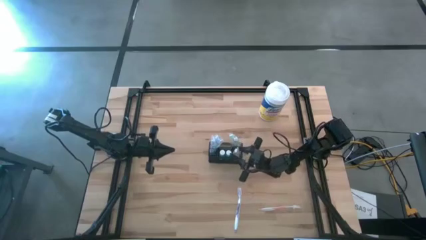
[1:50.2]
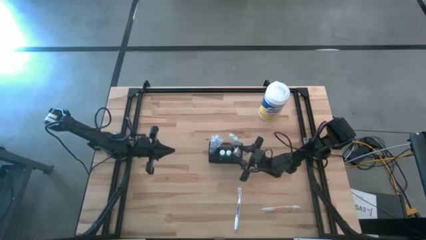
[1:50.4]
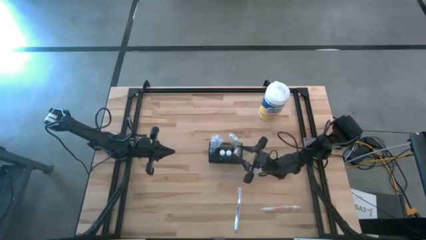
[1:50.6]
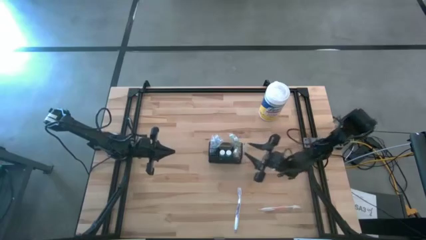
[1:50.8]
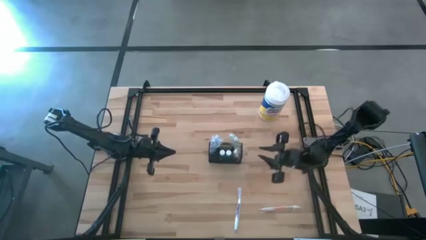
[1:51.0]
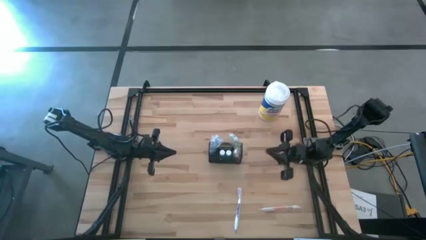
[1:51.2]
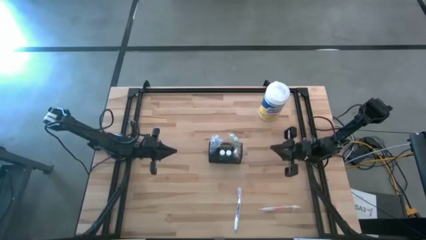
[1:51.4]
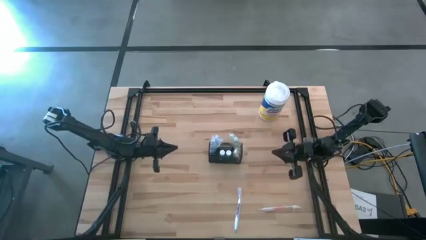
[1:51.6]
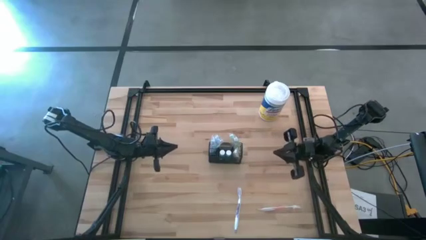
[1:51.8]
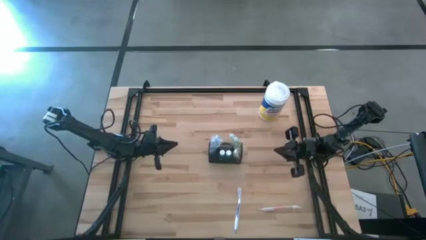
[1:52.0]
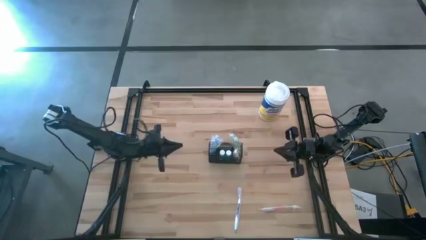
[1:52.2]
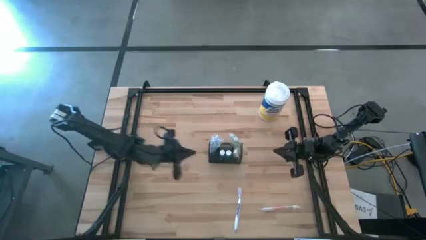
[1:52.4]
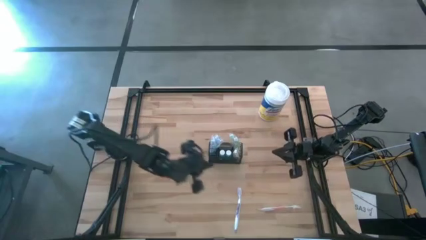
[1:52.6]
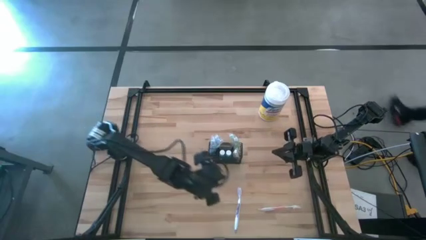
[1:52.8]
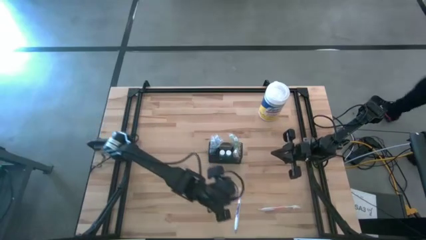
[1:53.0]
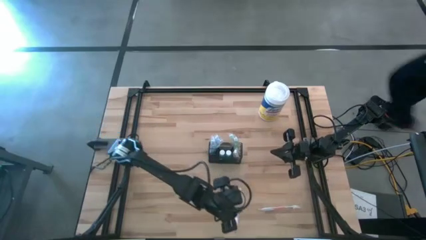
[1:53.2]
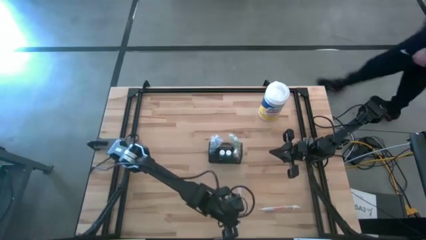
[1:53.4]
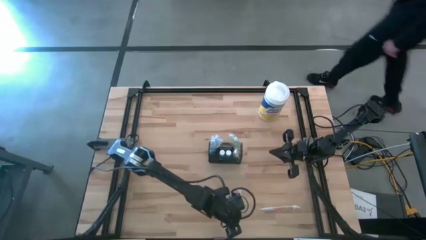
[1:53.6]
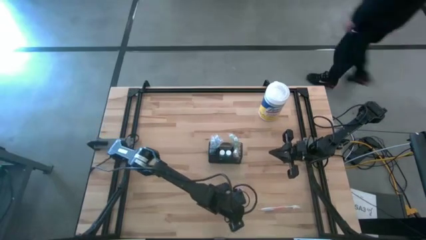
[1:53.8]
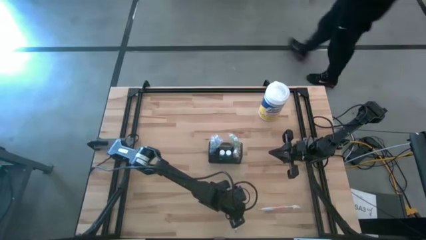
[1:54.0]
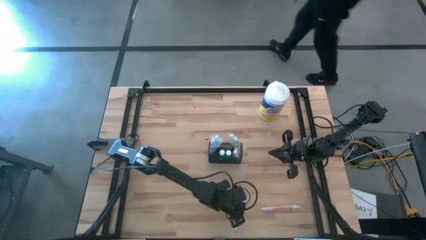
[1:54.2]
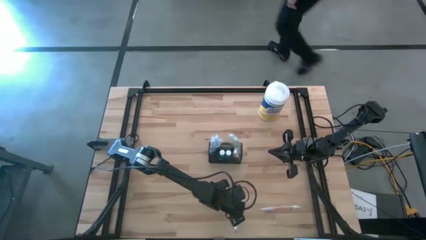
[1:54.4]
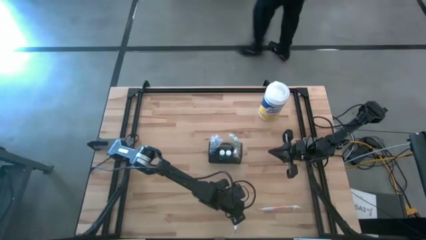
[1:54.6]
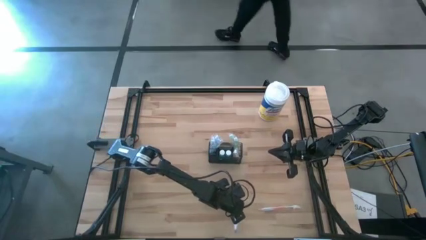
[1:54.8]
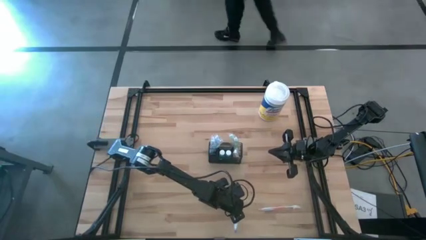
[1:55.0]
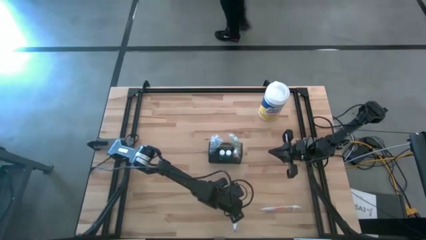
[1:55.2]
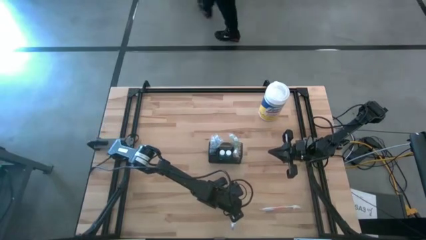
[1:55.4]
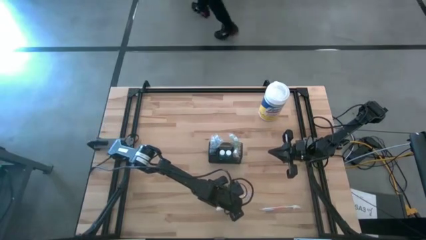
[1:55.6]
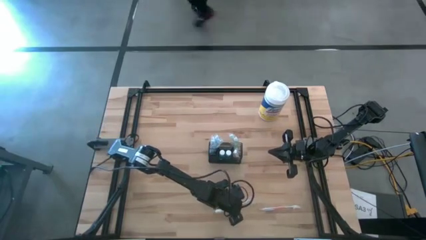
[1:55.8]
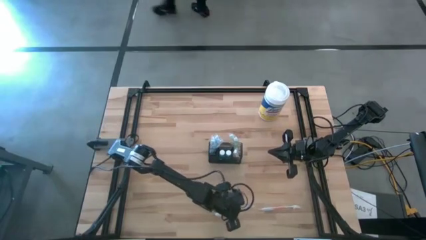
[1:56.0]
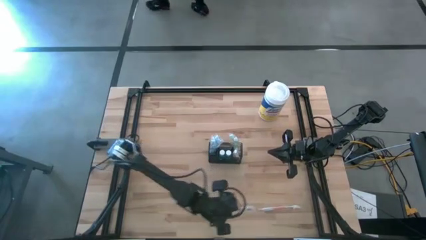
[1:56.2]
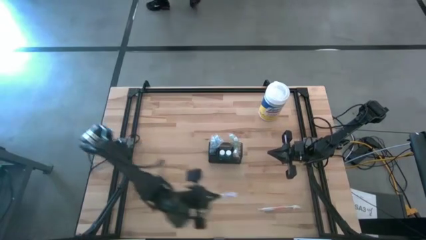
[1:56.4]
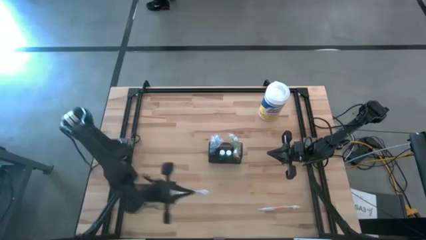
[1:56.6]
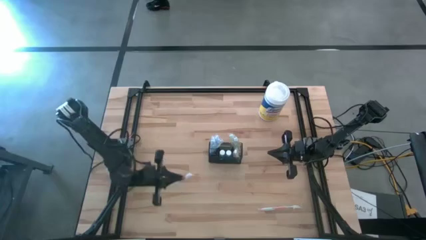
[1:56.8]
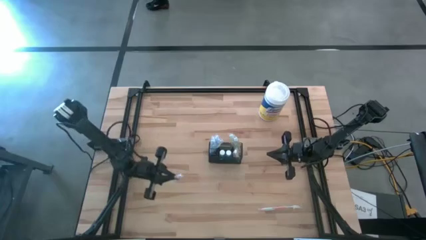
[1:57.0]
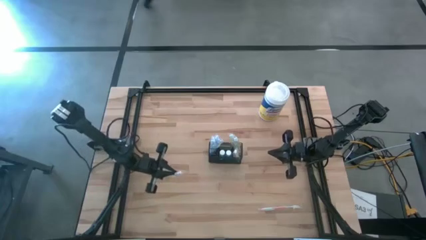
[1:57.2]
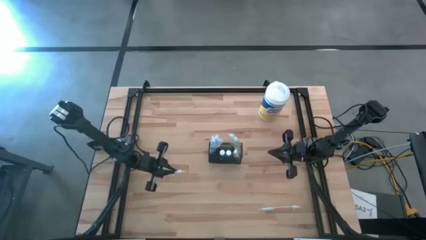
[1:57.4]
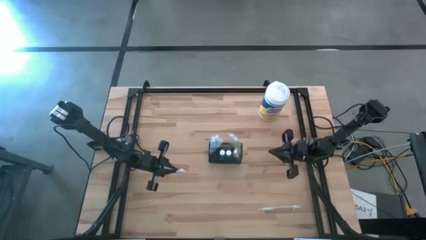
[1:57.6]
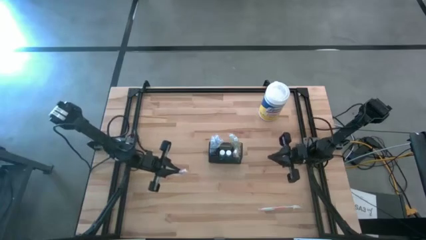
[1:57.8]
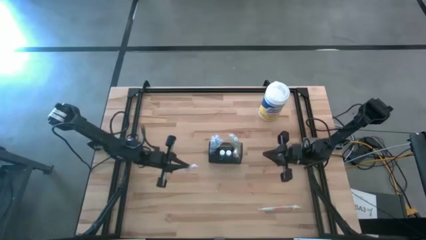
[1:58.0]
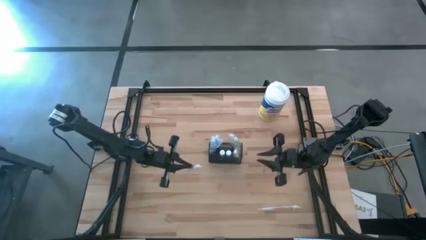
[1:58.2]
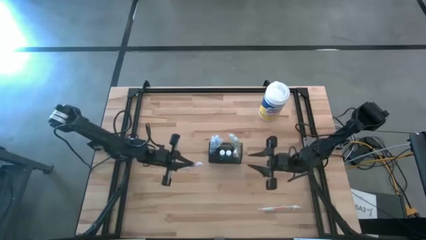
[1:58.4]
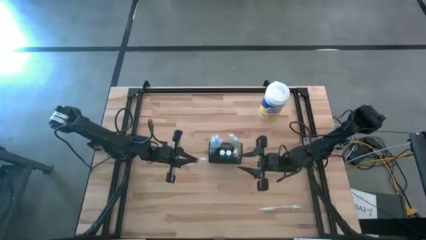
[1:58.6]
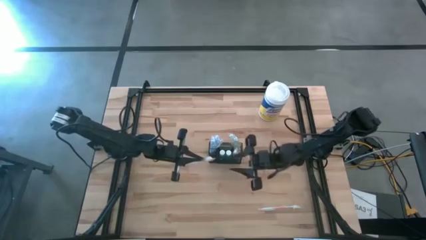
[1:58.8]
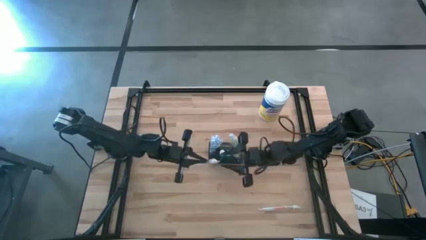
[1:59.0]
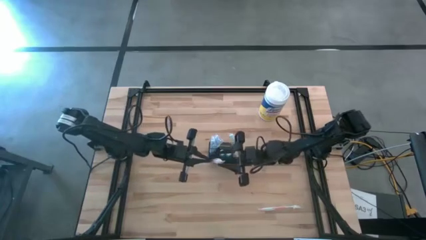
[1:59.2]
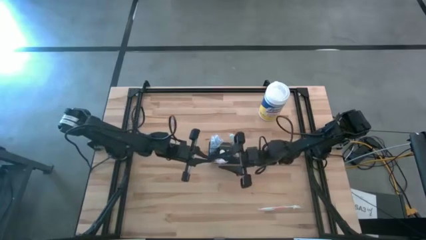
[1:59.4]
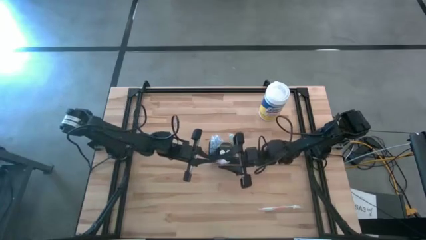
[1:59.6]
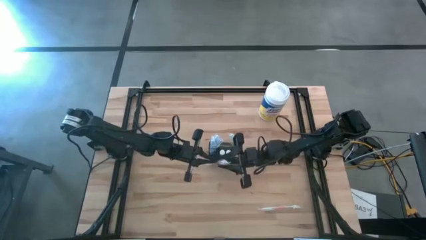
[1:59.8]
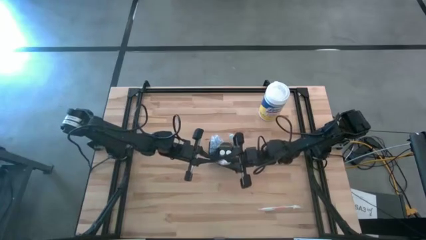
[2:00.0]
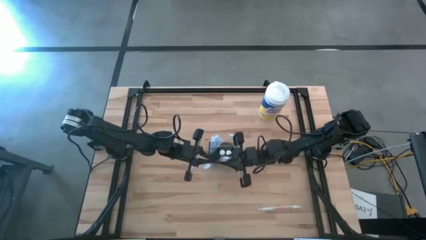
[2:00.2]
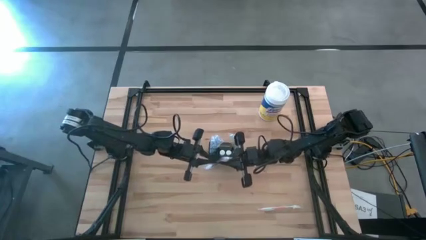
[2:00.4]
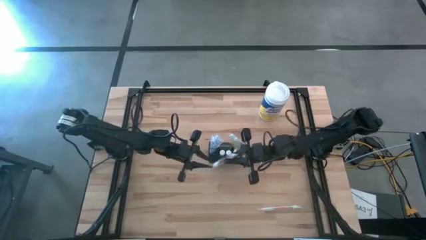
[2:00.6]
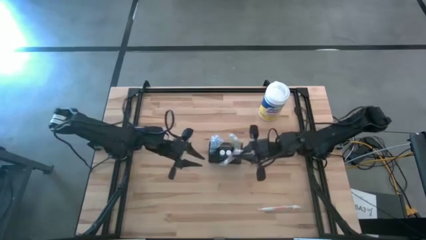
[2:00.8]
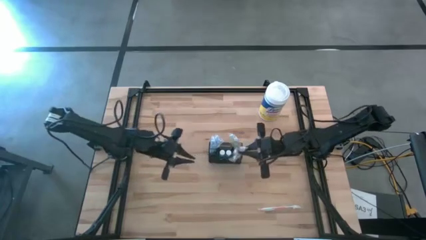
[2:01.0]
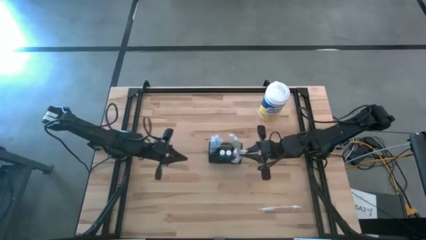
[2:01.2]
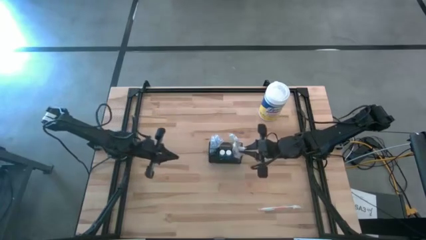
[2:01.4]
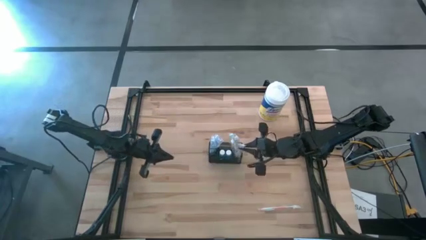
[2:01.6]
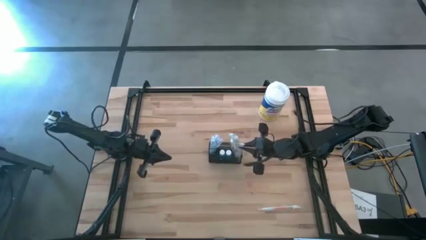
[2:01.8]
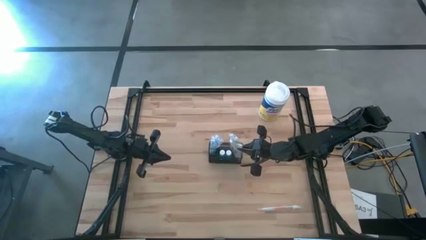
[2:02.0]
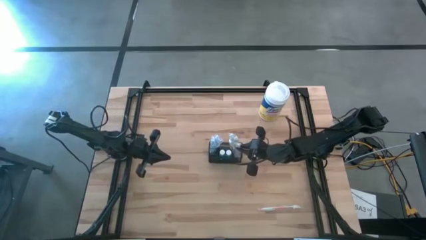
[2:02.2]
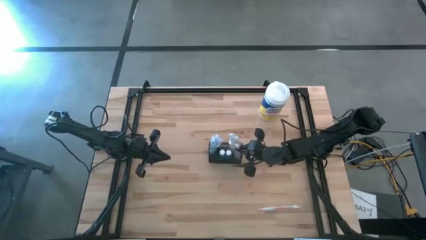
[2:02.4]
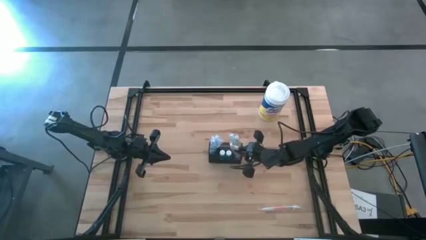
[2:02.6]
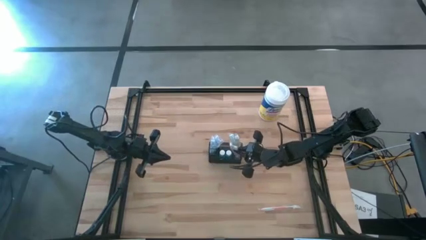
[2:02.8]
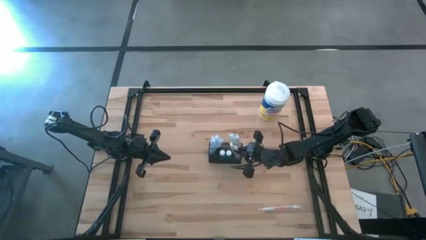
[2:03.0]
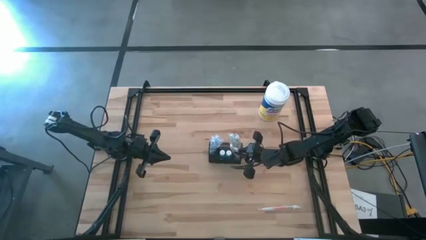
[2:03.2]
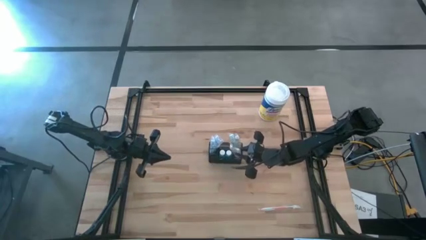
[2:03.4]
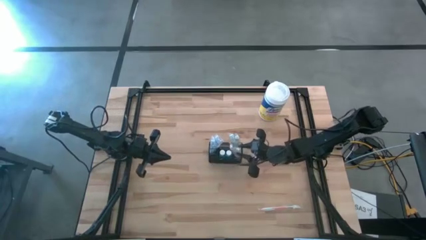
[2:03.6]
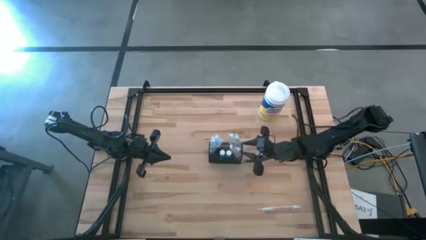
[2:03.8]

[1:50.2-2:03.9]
Task: Pick & Place toothbrushing station
Put the purple toothbrush into the wire organizer
